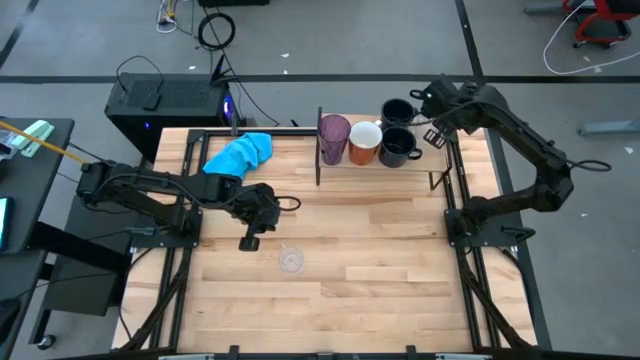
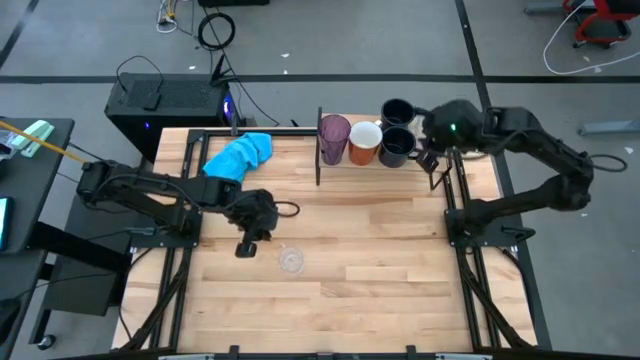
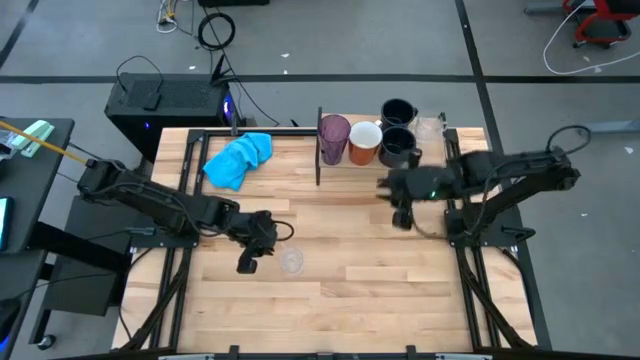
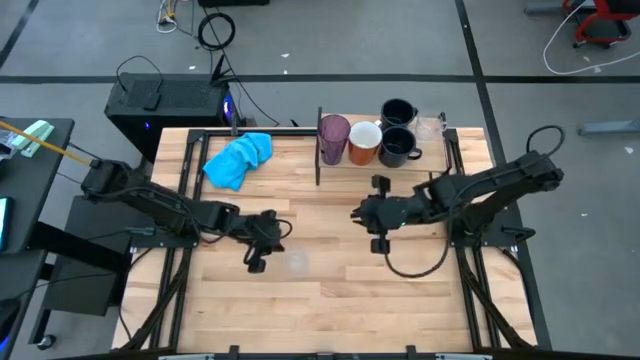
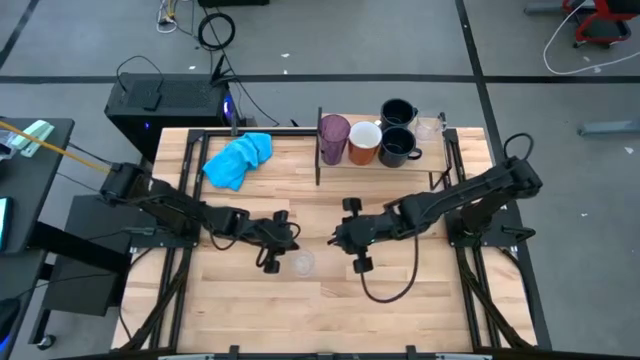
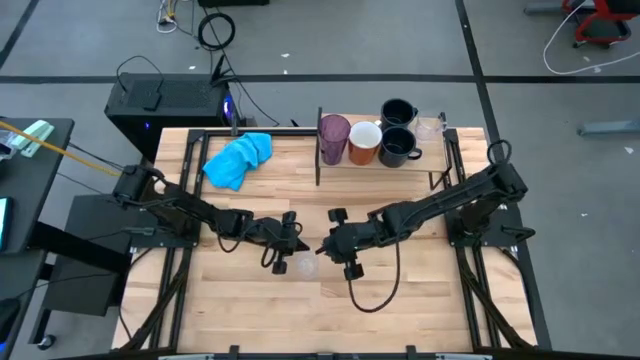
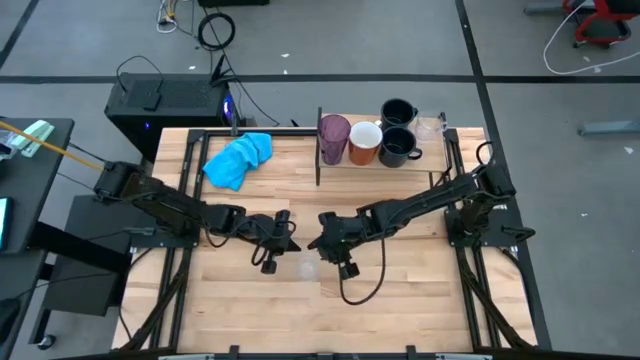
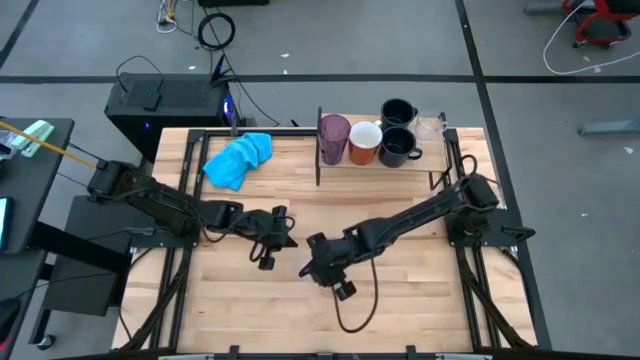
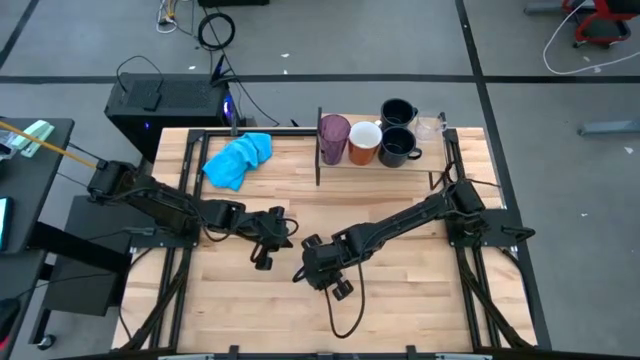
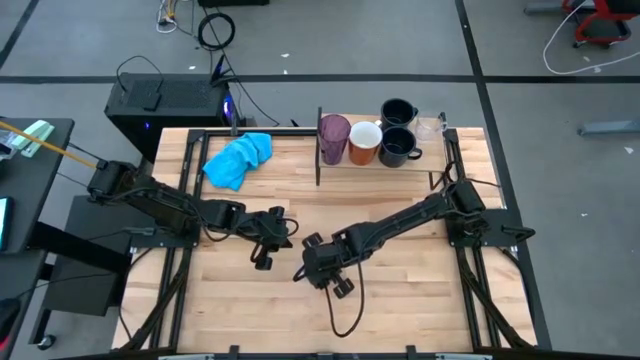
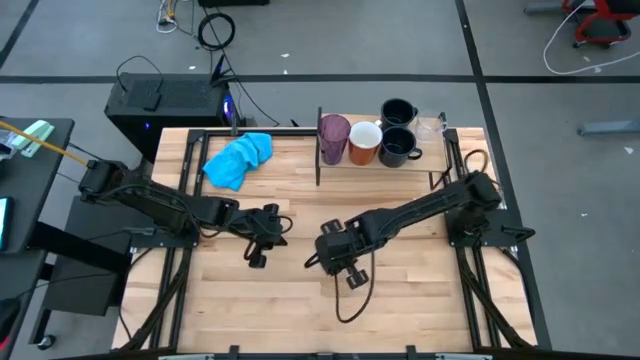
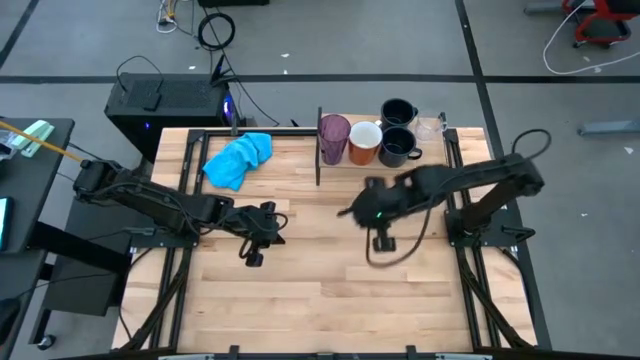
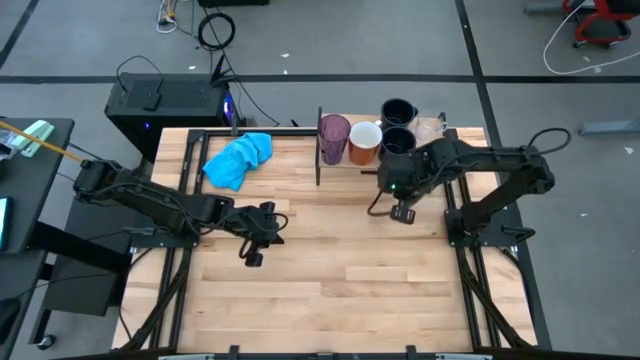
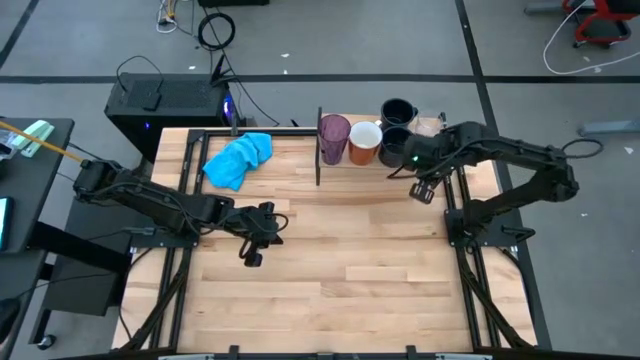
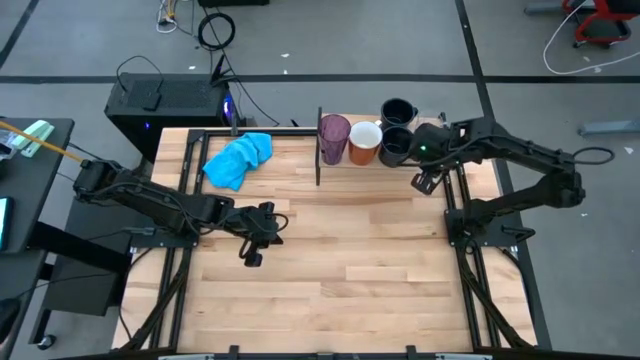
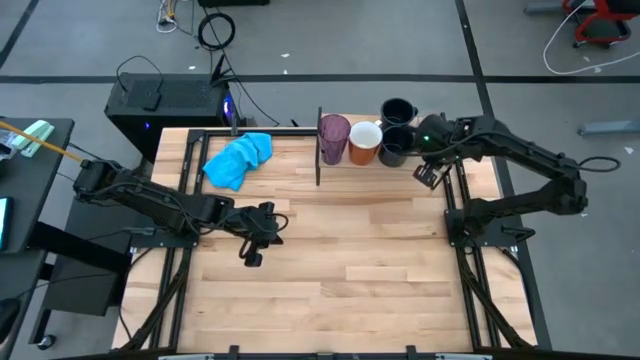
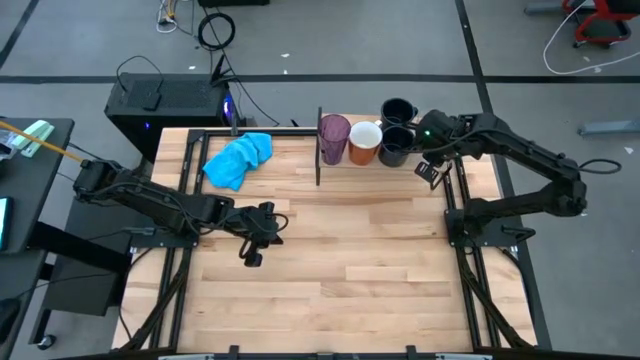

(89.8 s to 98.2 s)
Task: Stack small to large cups/mugs on shelf
Put the transparent mug on the shelf

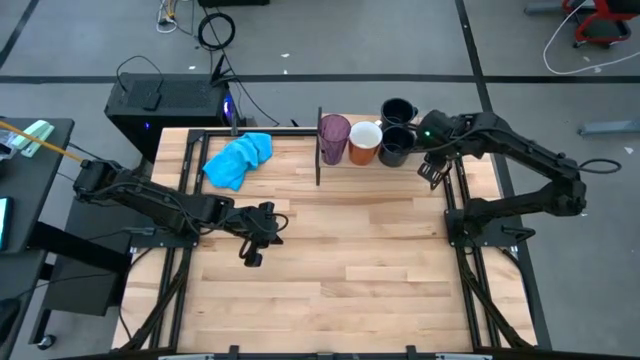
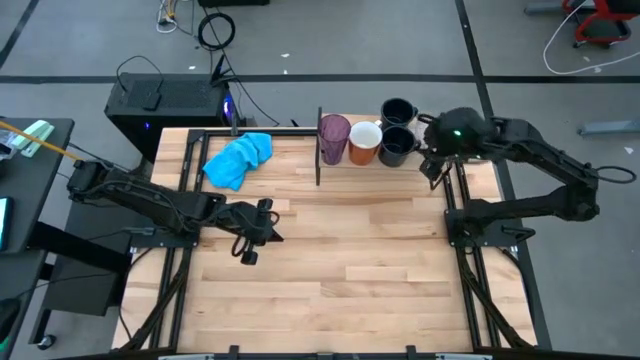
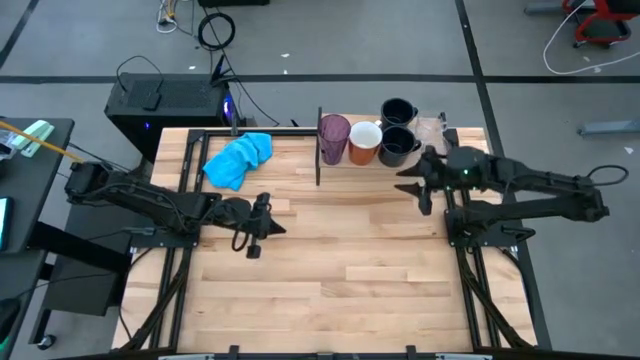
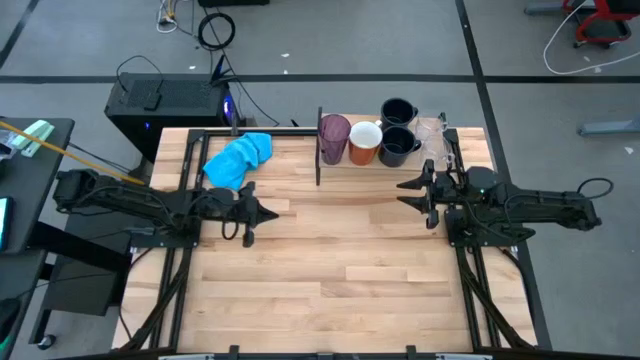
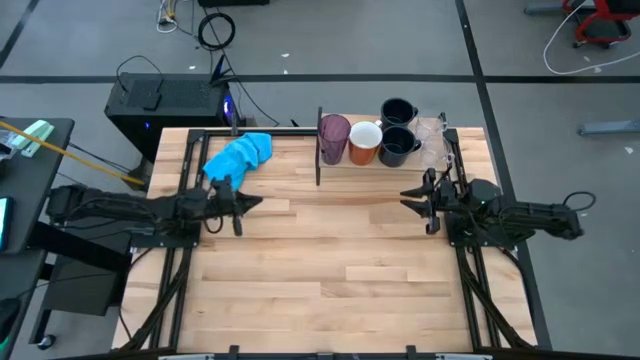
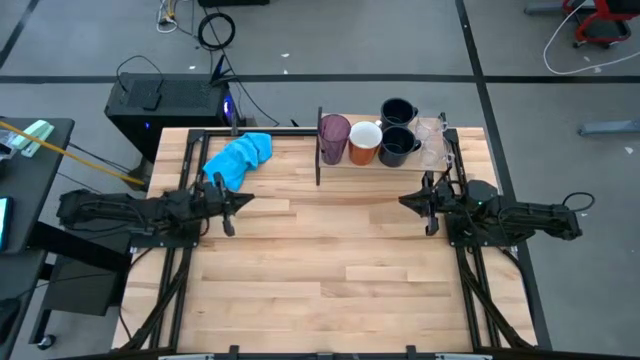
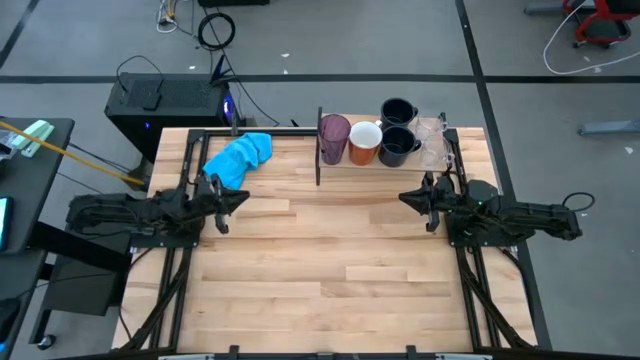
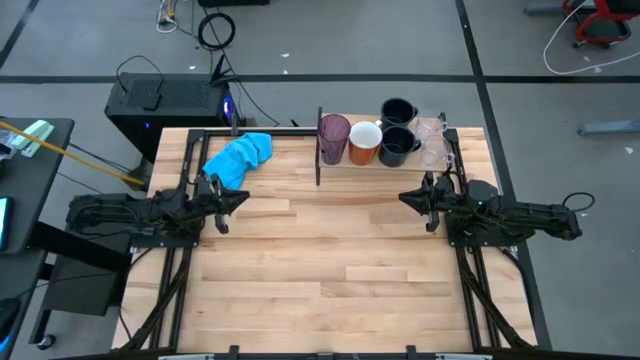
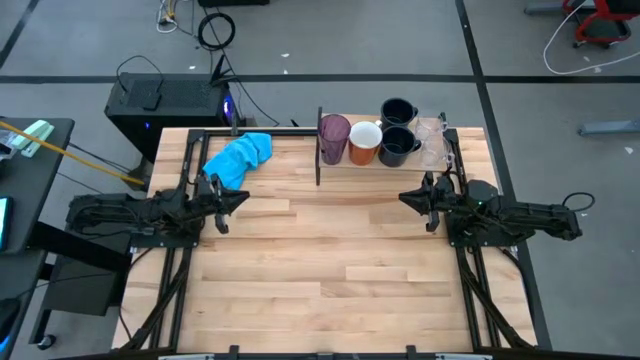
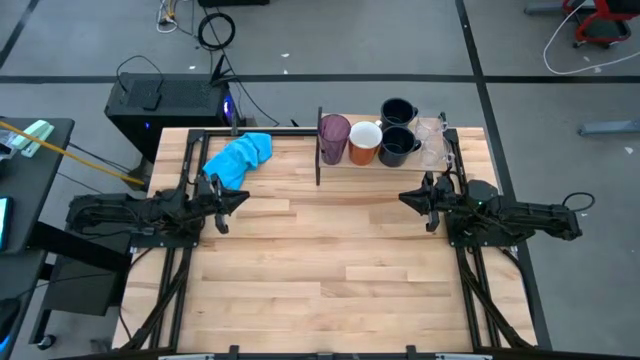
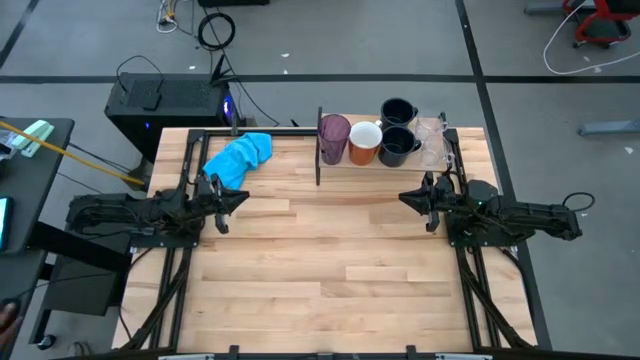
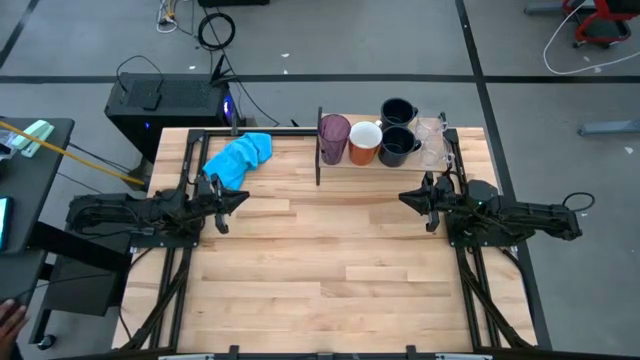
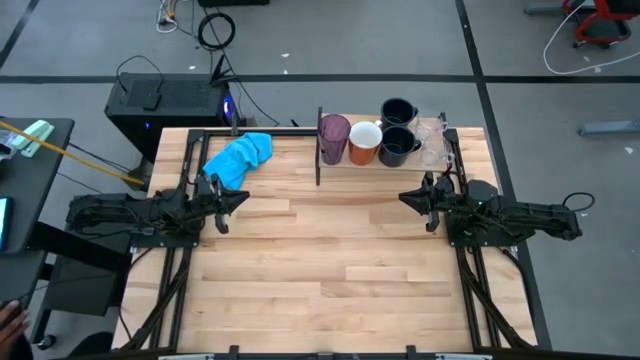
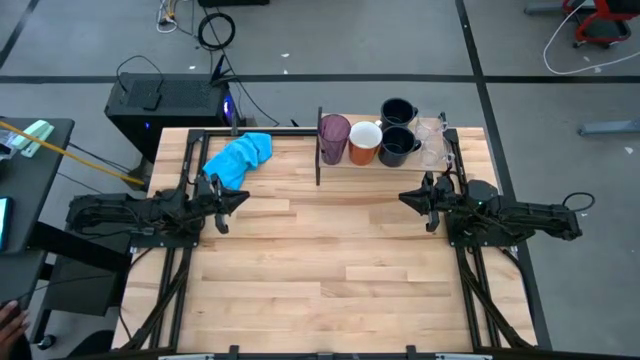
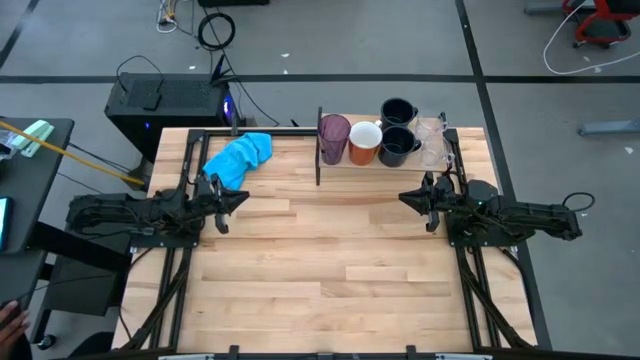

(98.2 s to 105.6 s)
Return to Home Position

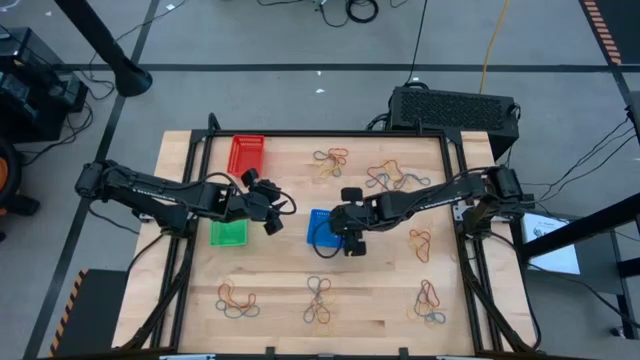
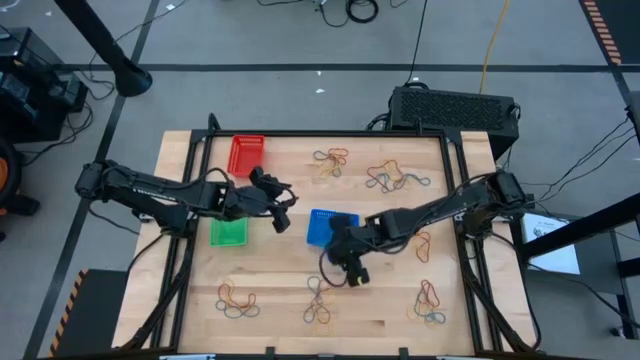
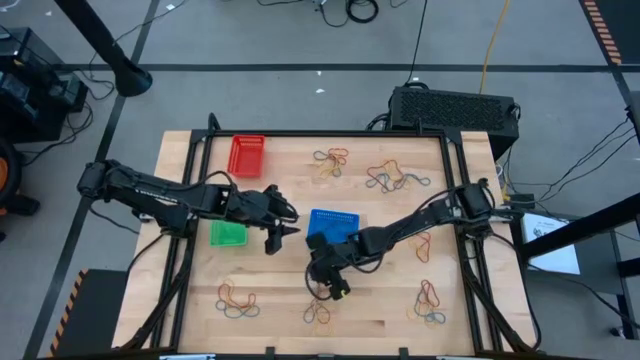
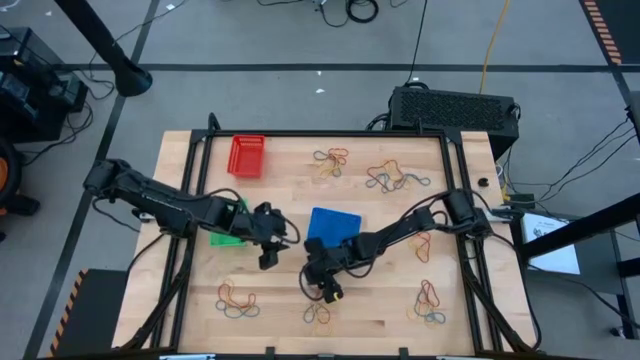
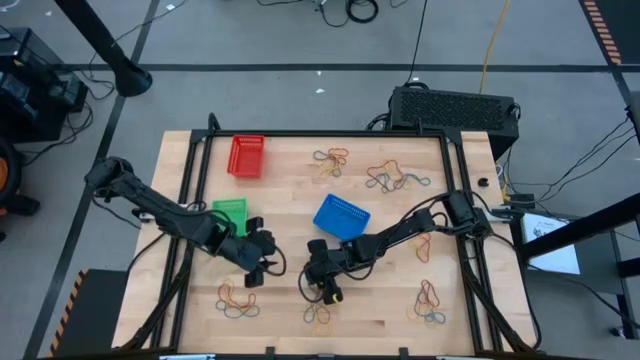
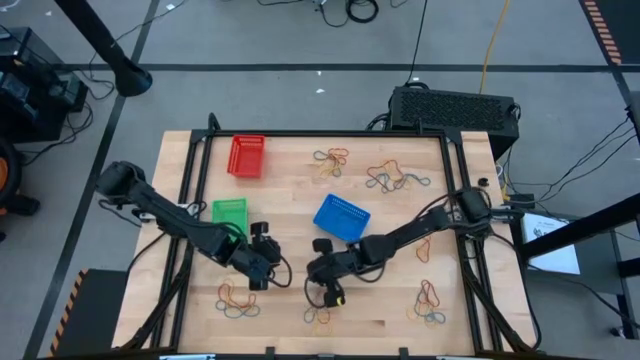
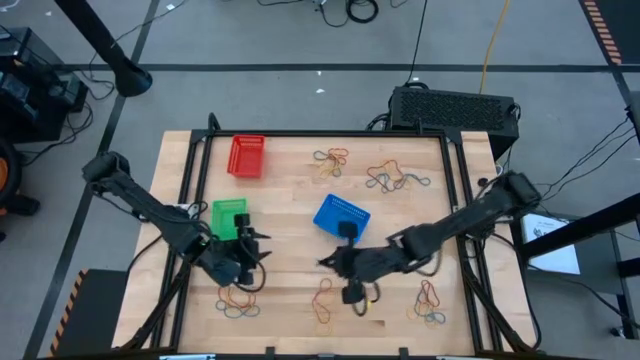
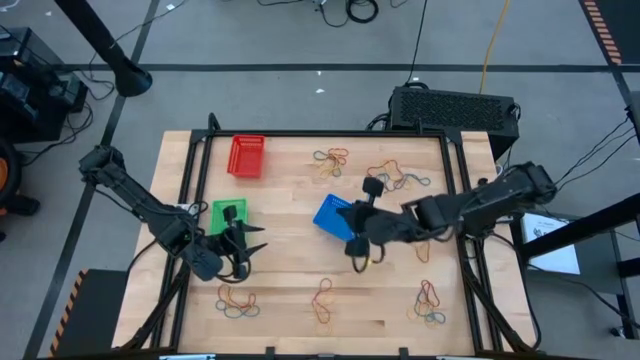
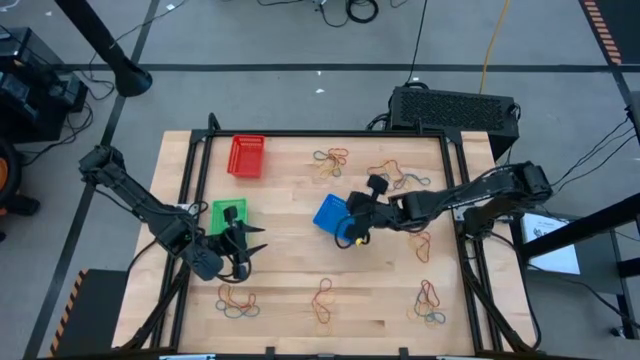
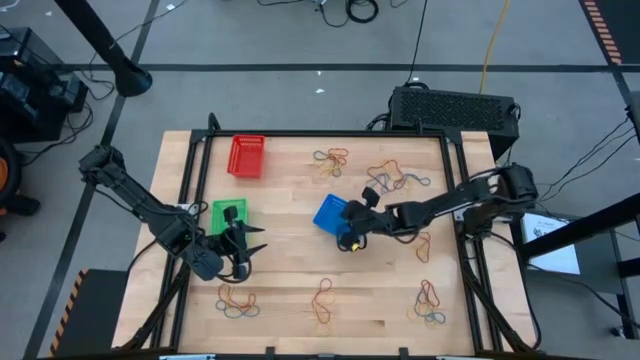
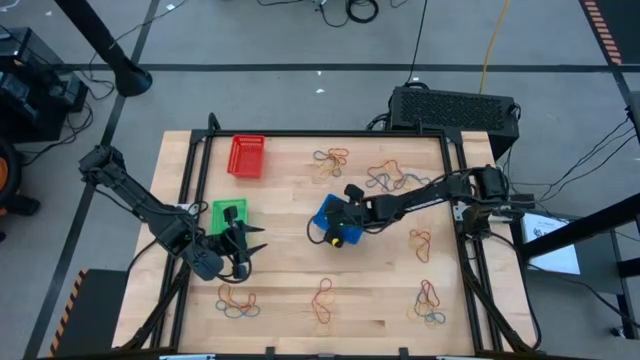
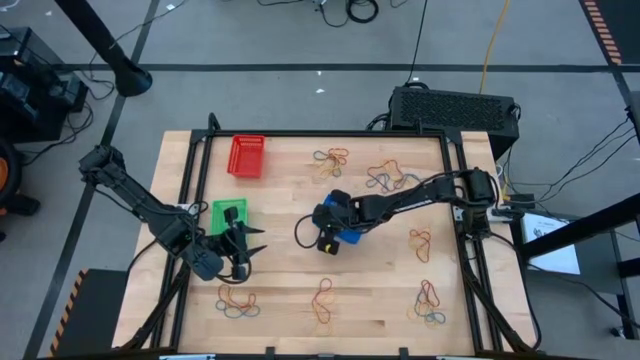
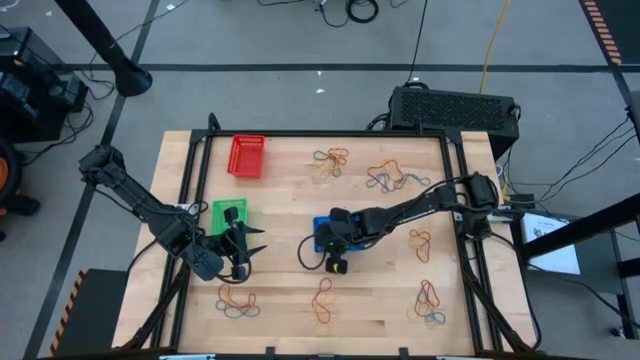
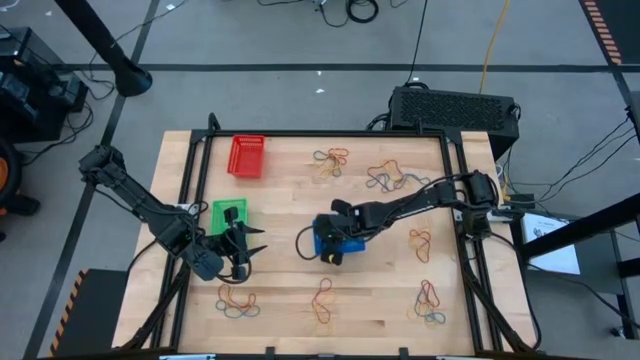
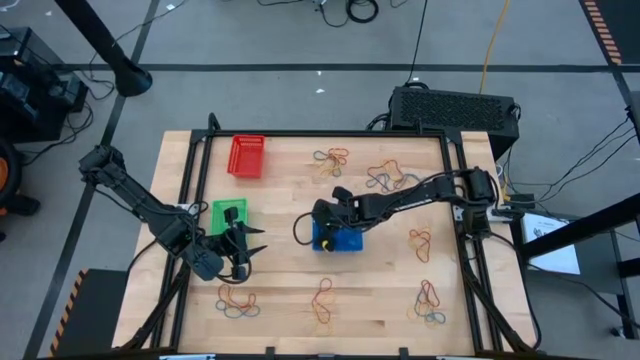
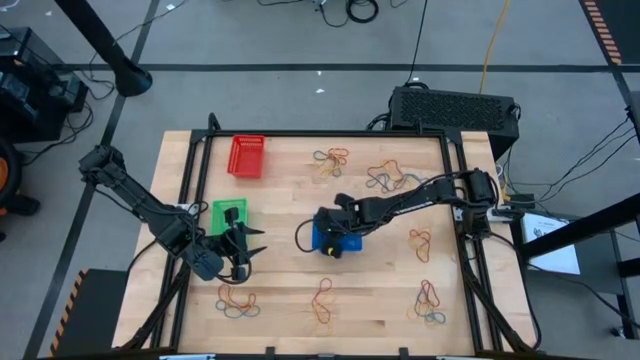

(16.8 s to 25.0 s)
Task: Sort rubber bands into baskets
Put the blue rubber band into the blue bin
